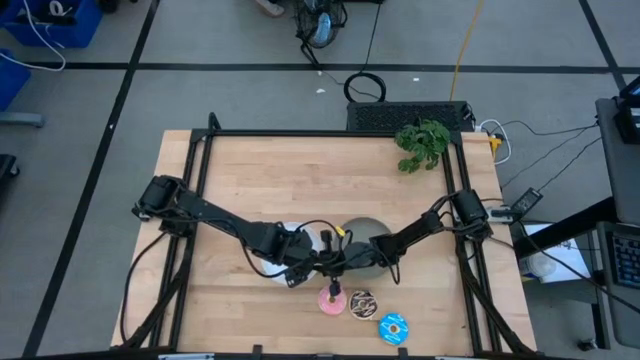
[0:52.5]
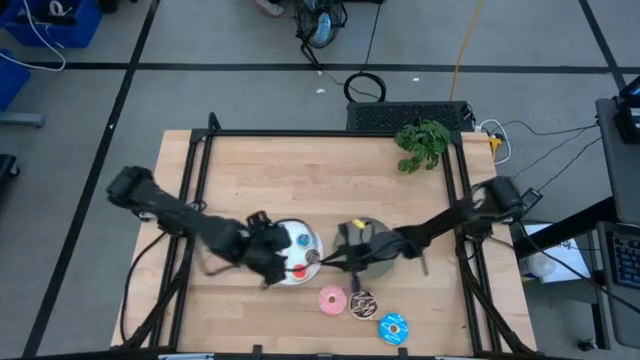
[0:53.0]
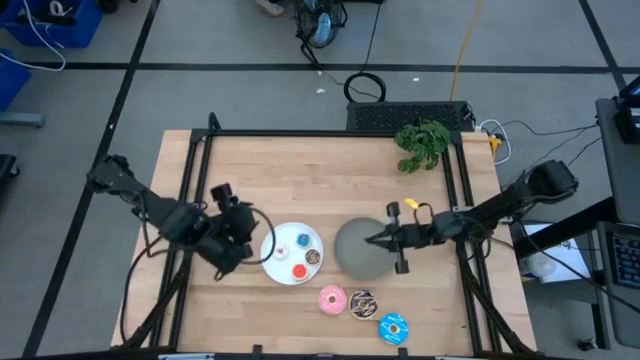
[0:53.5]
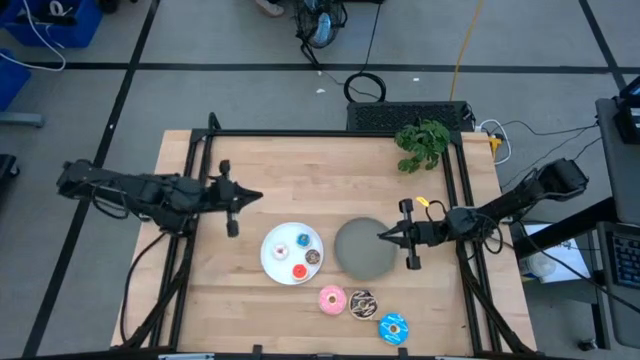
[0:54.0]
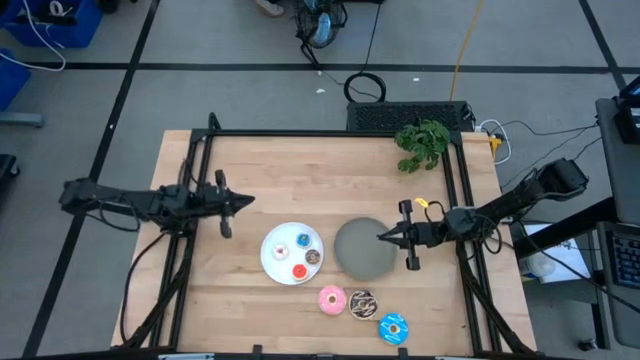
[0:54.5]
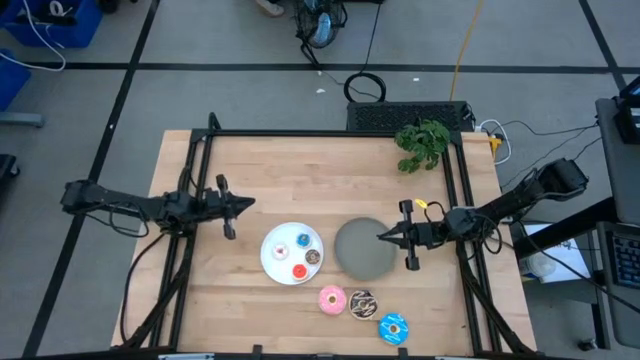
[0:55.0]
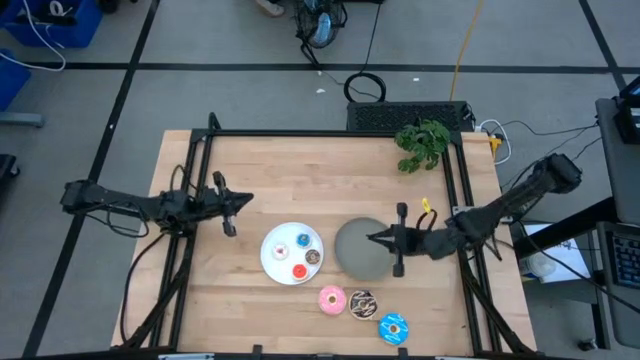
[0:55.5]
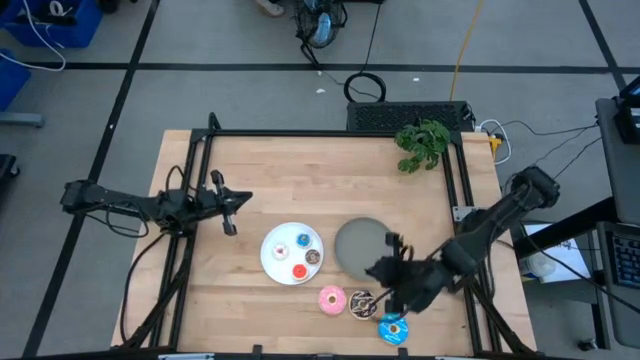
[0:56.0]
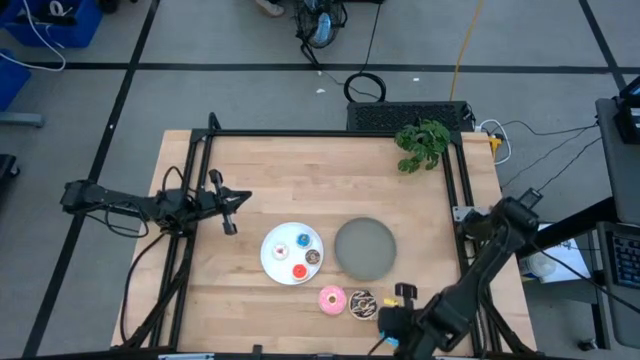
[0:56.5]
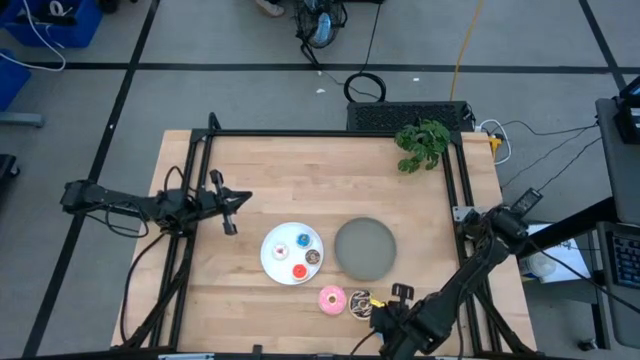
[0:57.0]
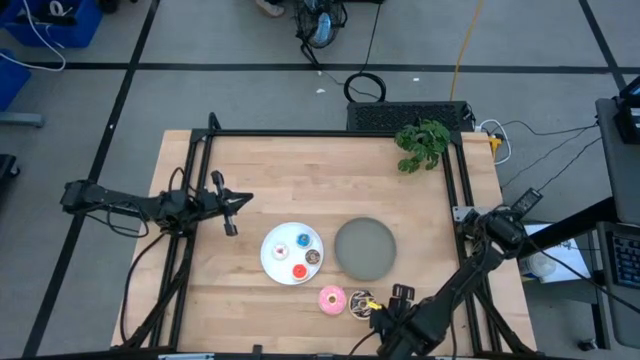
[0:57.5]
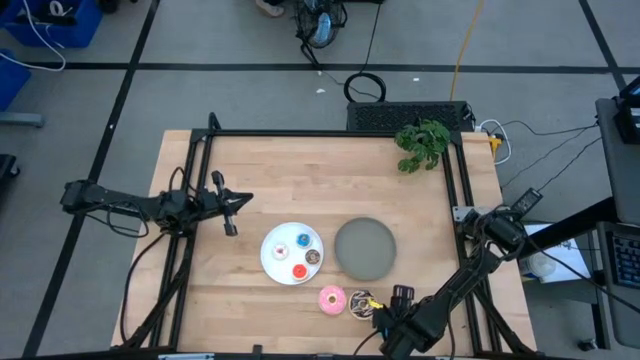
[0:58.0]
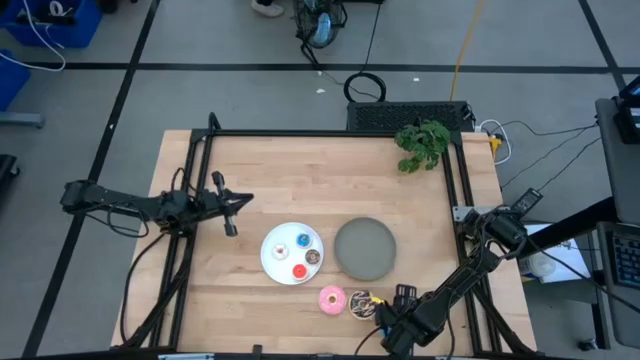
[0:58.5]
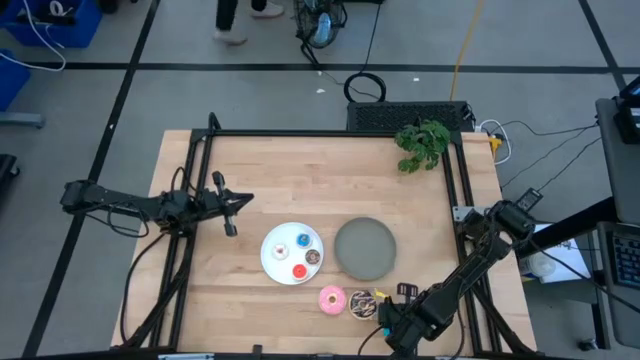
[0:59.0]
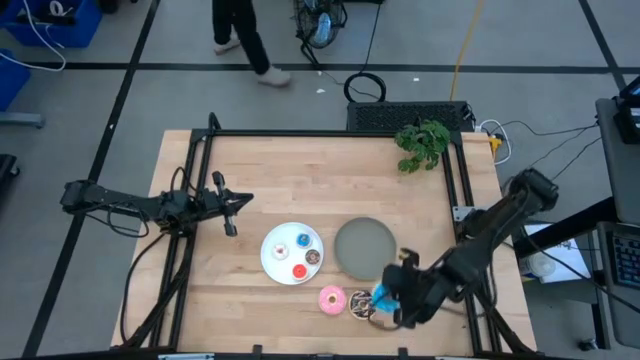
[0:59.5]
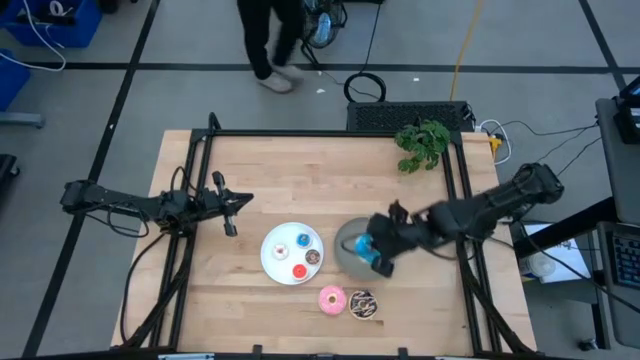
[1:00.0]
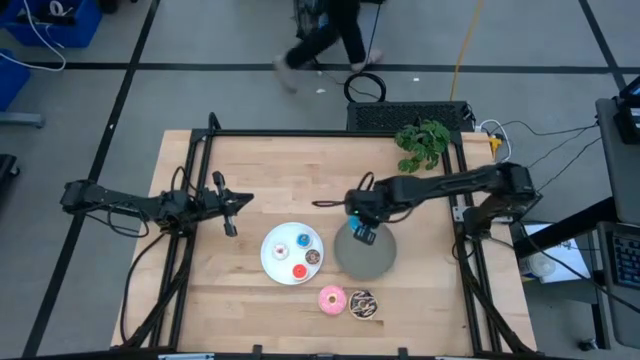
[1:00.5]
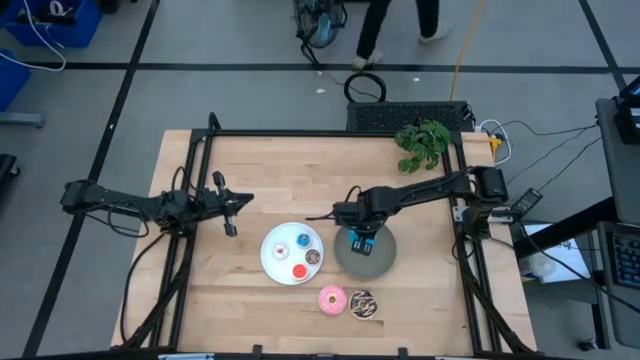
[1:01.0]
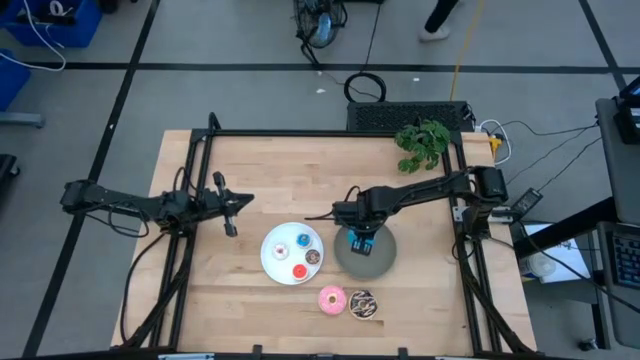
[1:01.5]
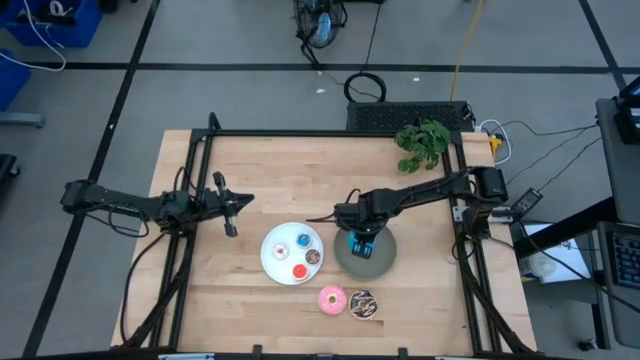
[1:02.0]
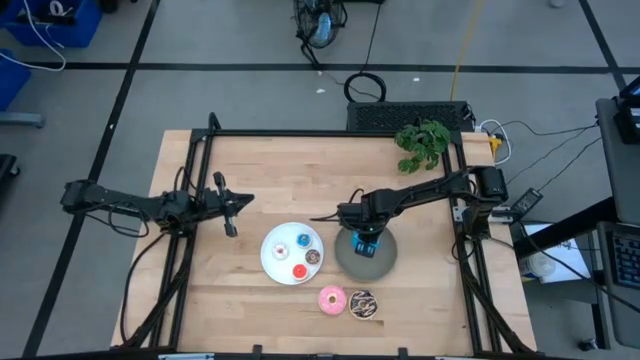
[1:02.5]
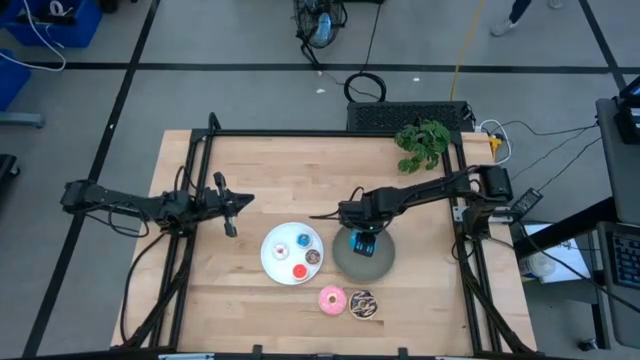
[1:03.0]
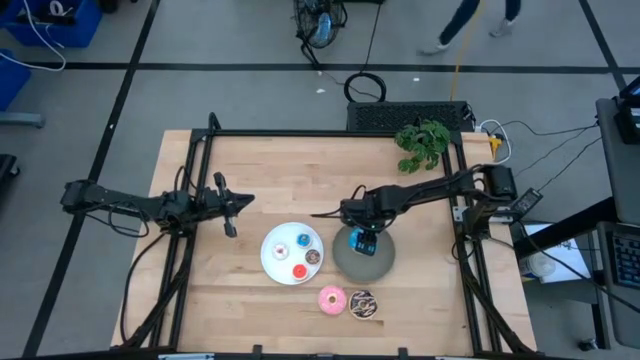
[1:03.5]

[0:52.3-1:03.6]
Task: Pick & Place donuts
Put the large blue donut on the green plate

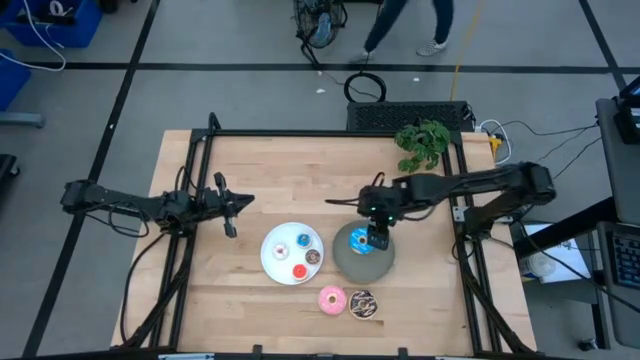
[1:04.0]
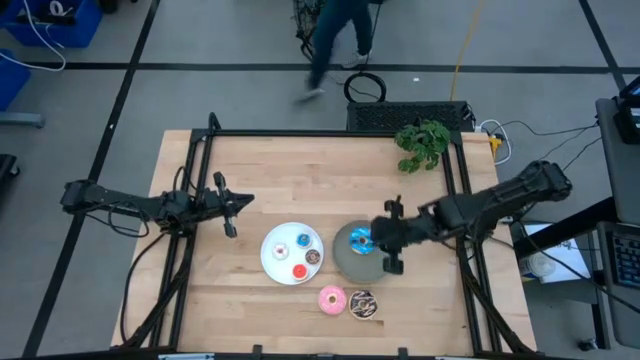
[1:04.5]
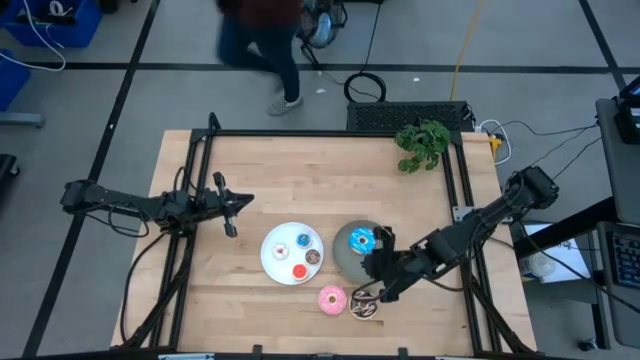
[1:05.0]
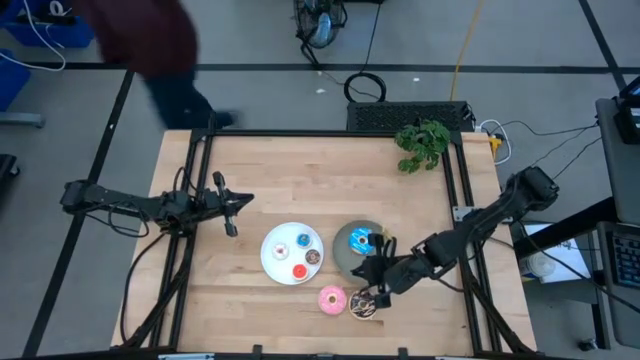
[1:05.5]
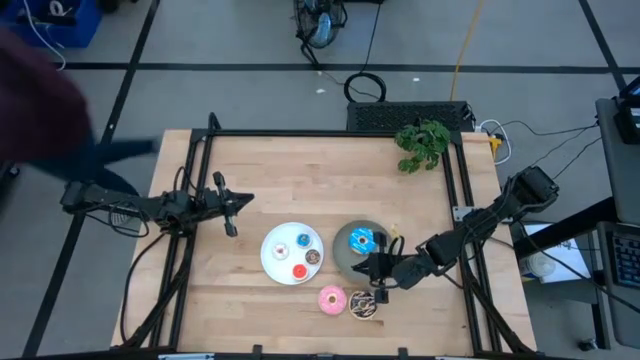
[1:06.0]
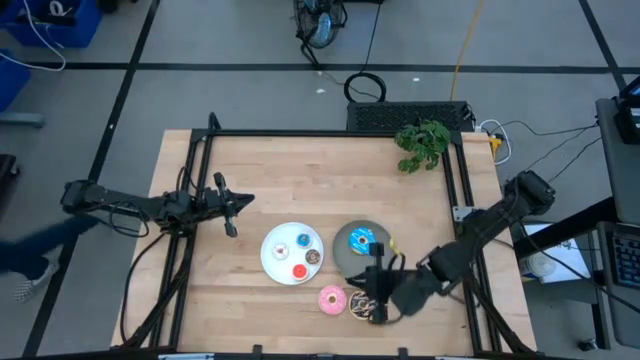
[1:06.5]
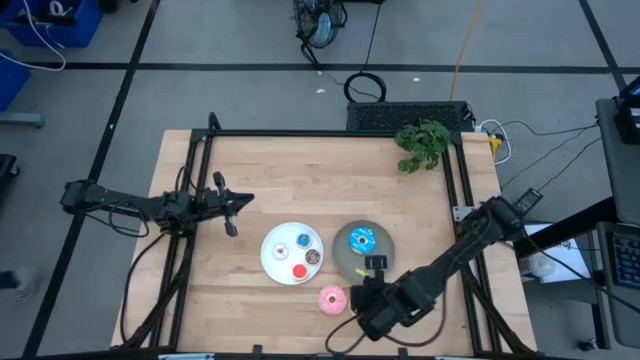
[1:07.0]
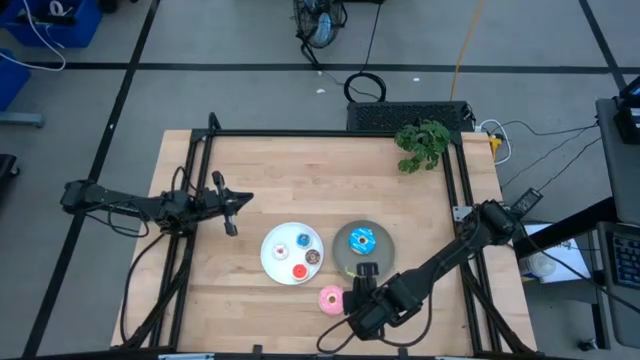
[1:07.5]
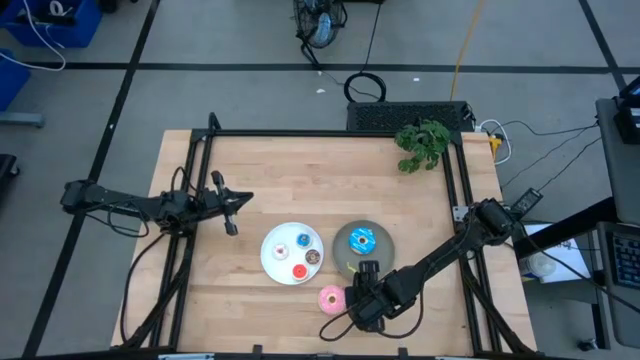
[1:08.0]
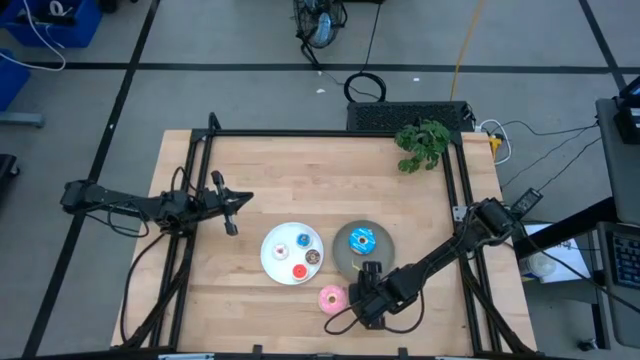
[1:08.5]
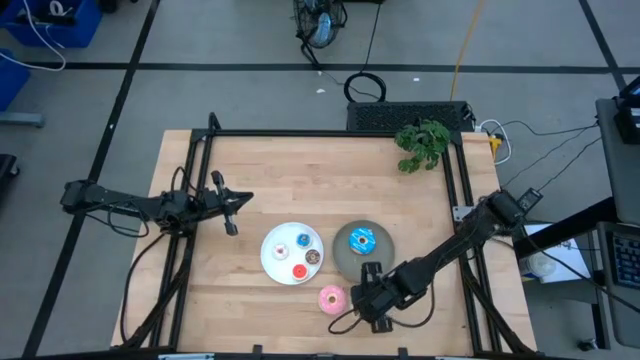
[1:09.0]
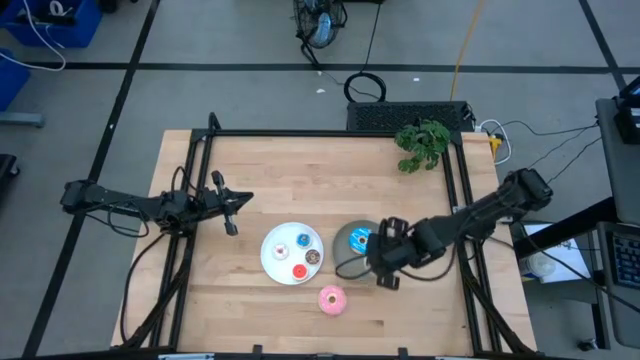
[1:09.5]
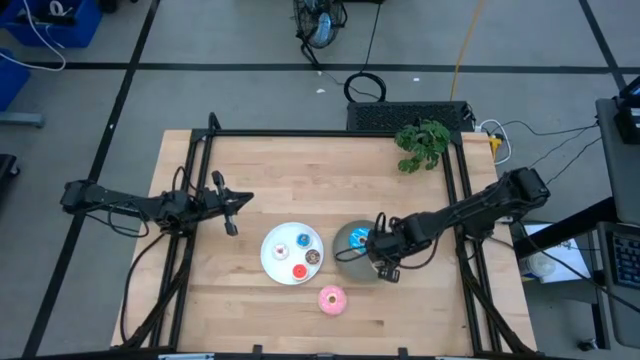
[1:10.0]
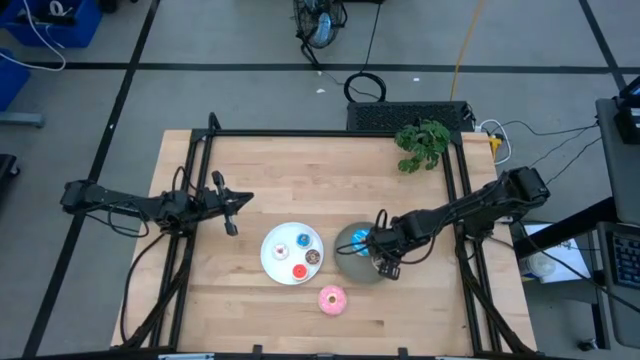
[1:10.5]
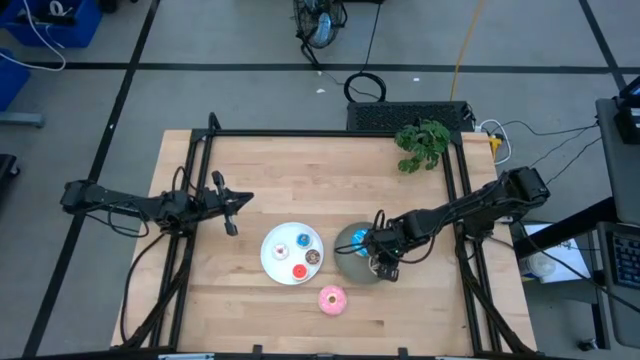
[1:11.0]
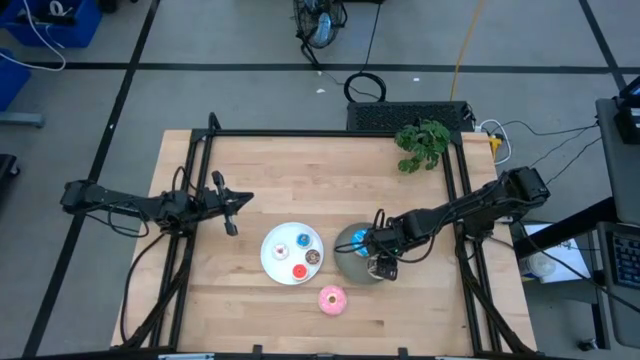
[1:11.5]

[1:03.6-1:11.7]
Put the large black donut on the green plate

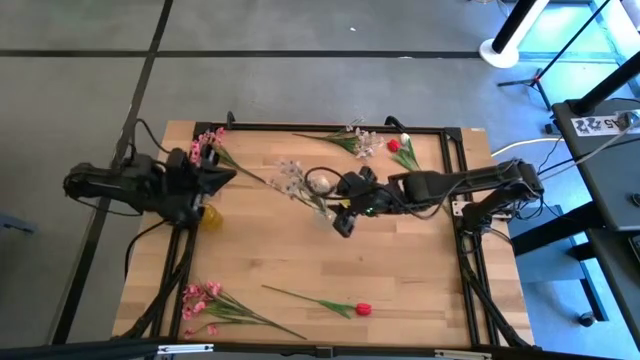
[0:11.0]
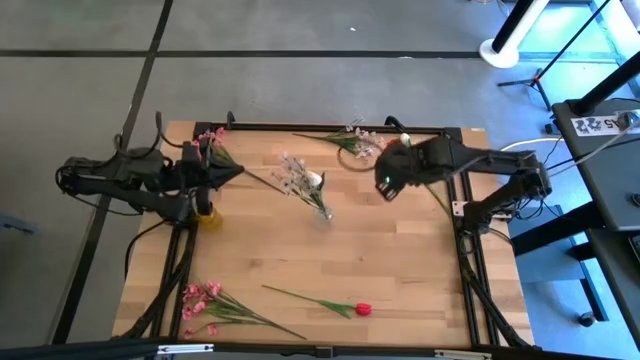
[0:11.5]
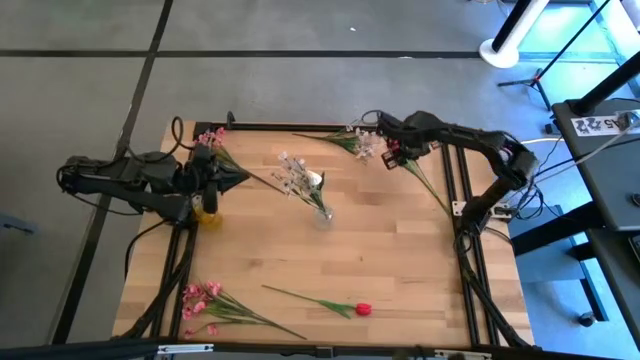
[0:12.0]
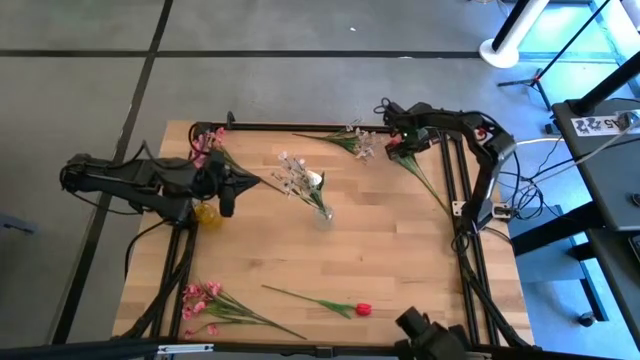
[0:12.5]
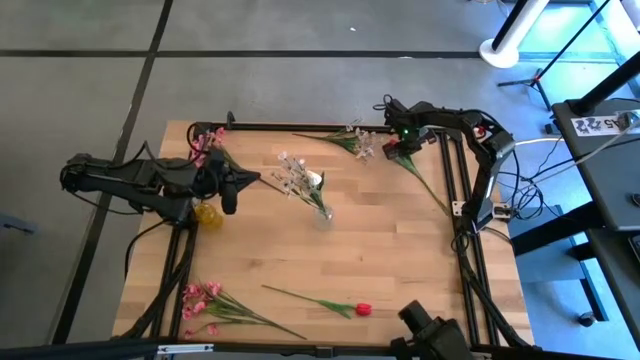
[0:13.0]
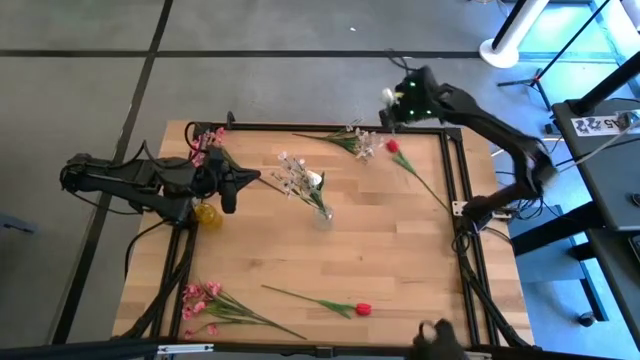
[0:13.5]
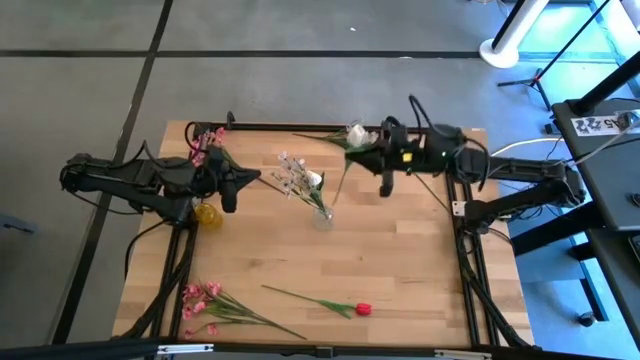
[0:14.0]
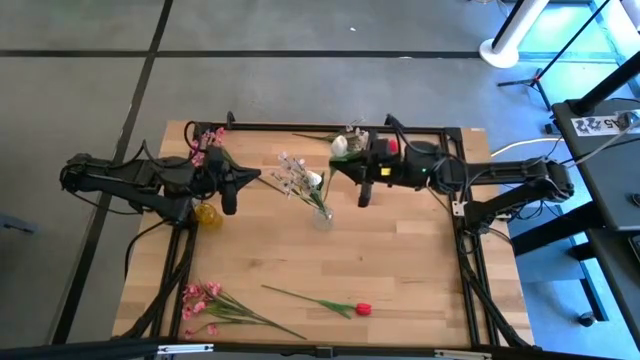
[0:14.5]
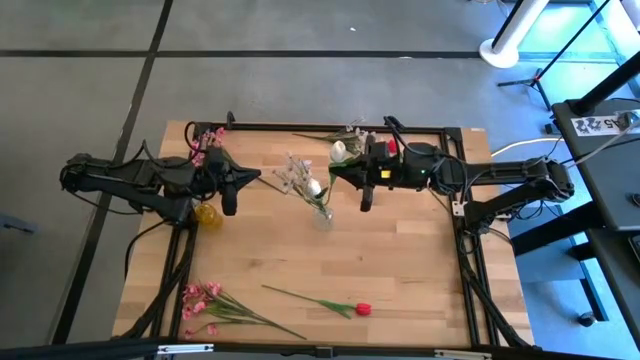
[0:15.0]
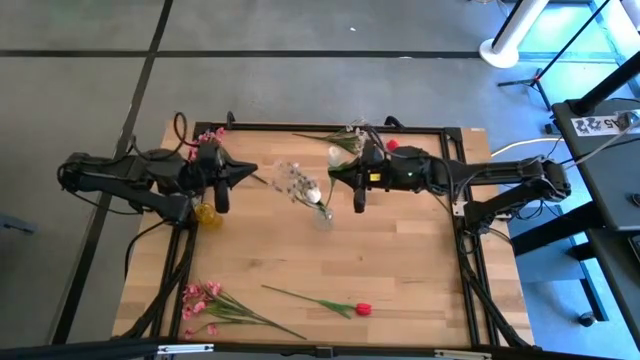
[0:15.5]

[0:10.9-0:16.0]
Task: Sort flowers into vase by color
Put the white tulip into the transparent vase
